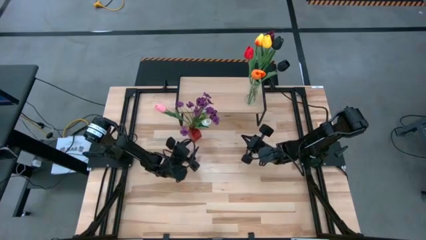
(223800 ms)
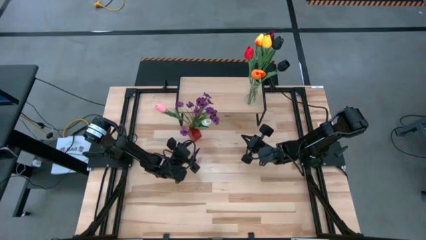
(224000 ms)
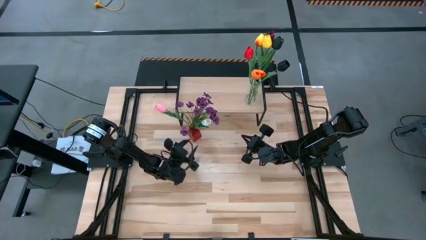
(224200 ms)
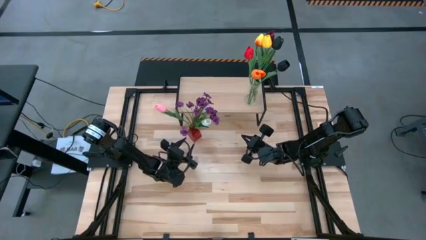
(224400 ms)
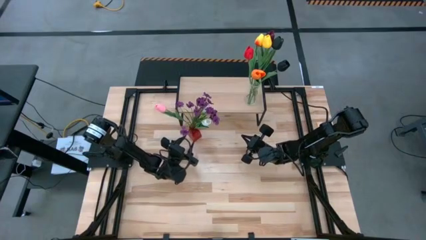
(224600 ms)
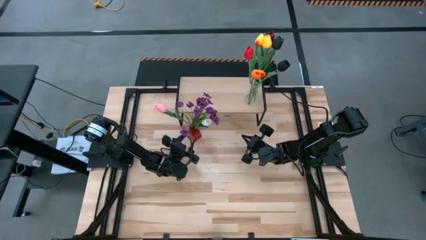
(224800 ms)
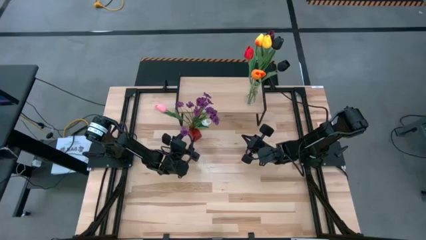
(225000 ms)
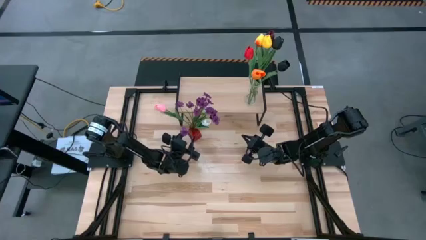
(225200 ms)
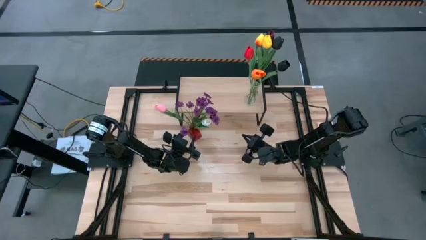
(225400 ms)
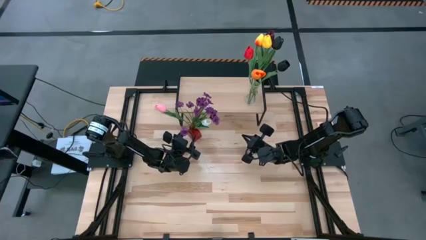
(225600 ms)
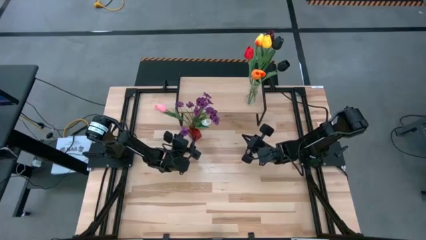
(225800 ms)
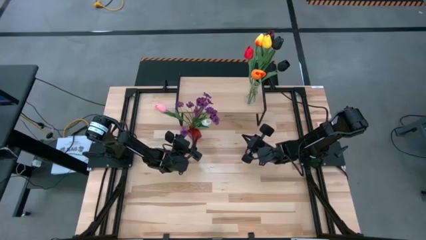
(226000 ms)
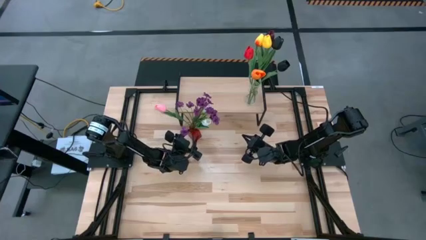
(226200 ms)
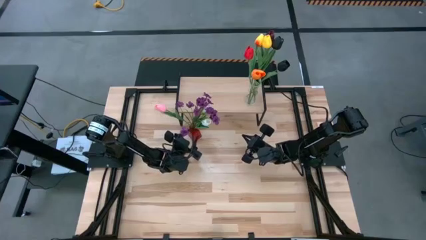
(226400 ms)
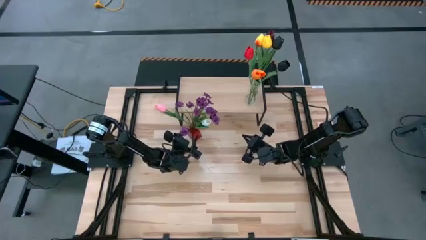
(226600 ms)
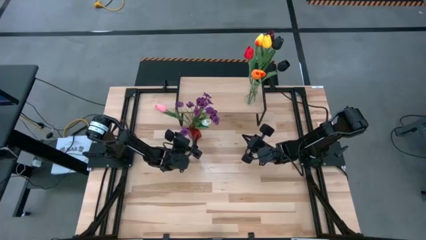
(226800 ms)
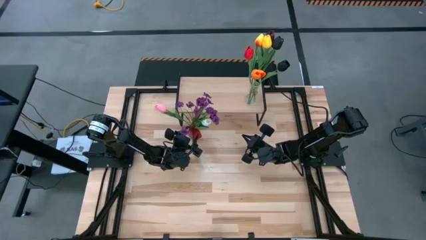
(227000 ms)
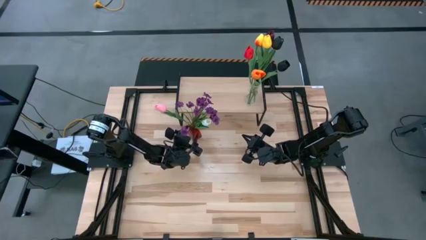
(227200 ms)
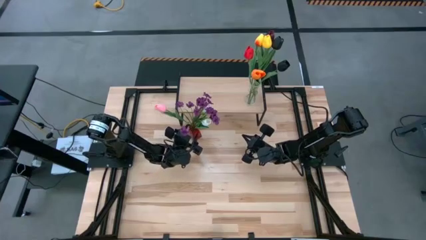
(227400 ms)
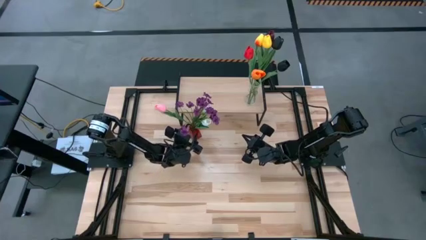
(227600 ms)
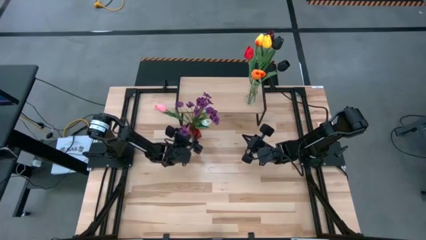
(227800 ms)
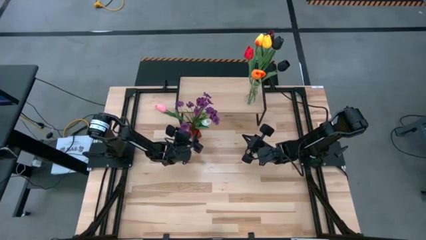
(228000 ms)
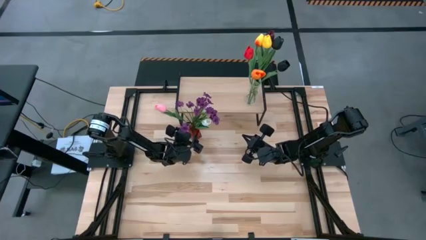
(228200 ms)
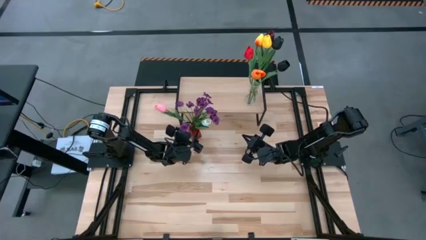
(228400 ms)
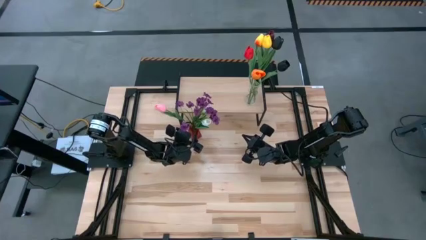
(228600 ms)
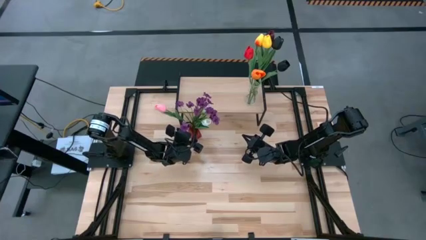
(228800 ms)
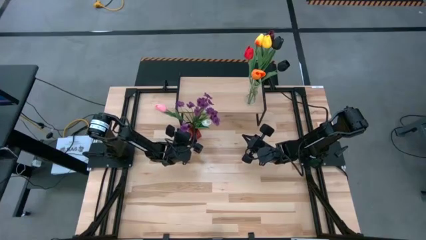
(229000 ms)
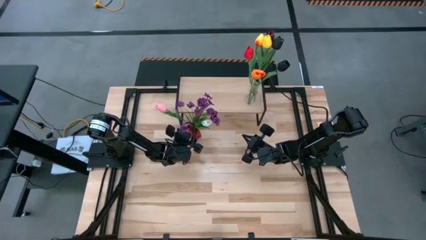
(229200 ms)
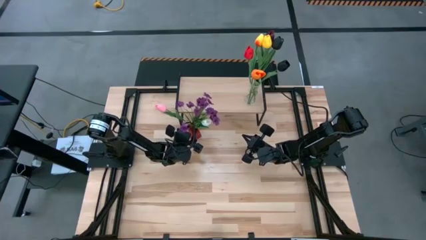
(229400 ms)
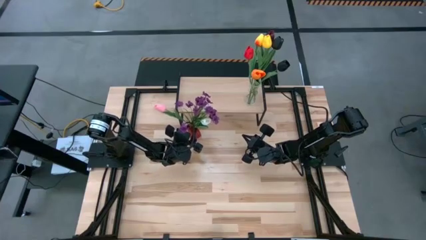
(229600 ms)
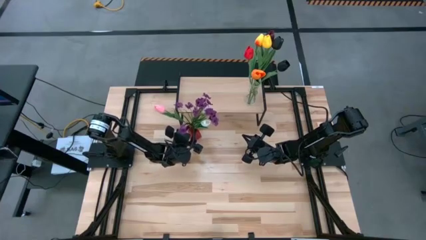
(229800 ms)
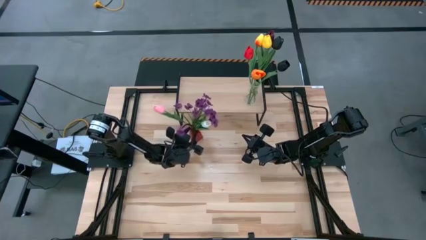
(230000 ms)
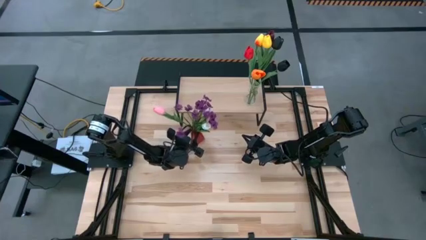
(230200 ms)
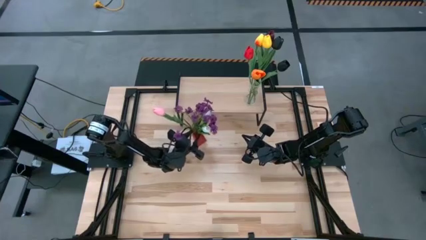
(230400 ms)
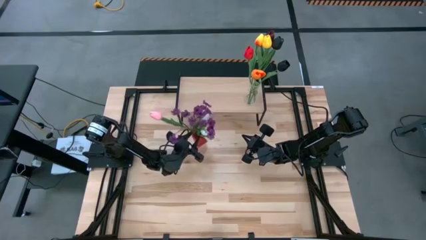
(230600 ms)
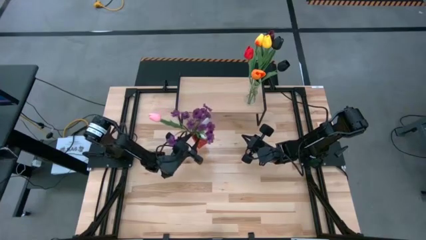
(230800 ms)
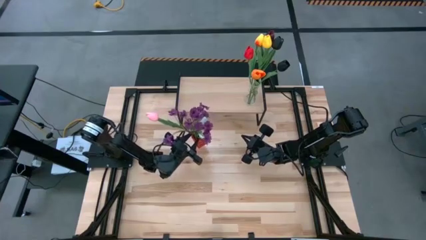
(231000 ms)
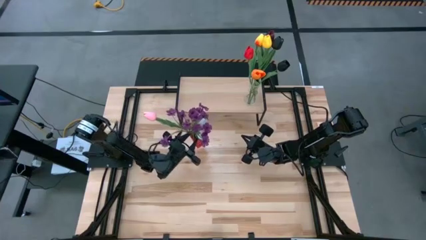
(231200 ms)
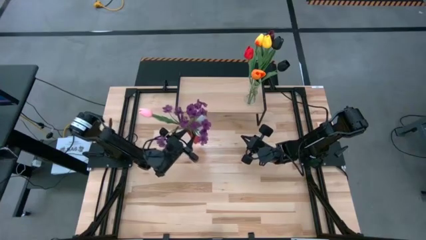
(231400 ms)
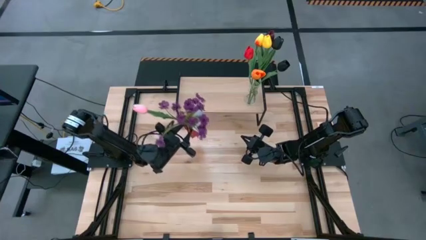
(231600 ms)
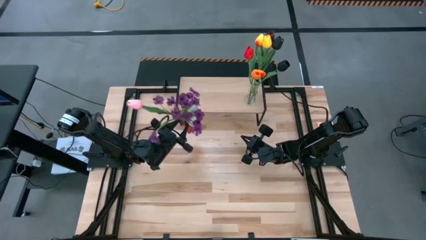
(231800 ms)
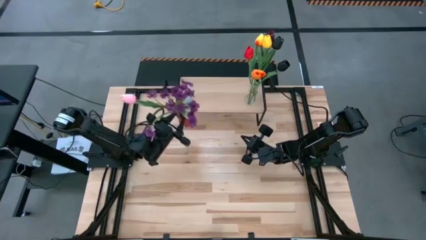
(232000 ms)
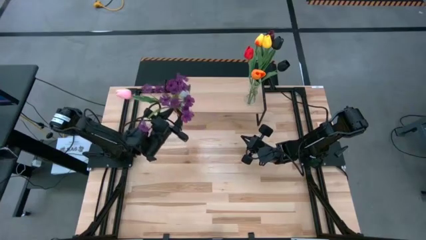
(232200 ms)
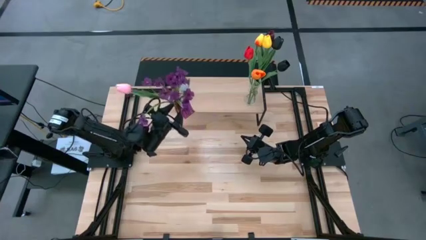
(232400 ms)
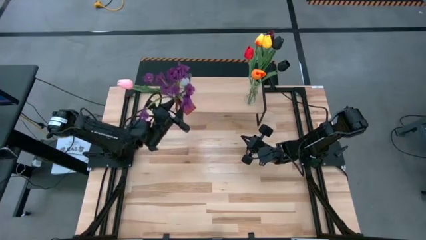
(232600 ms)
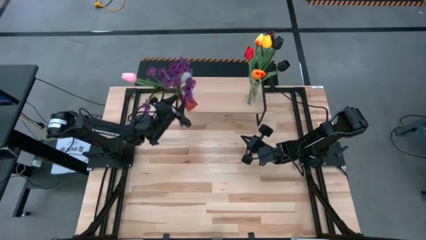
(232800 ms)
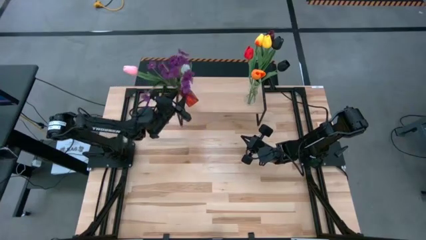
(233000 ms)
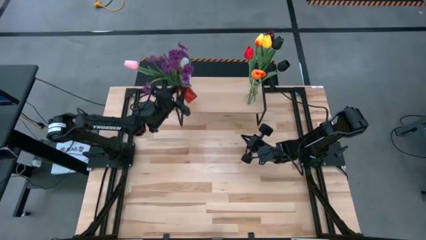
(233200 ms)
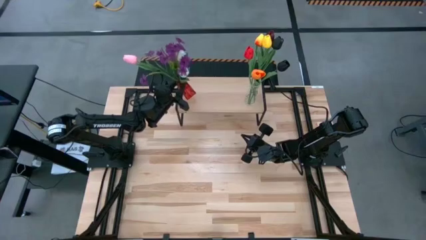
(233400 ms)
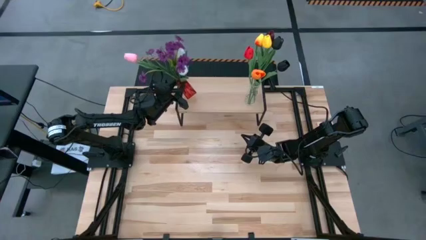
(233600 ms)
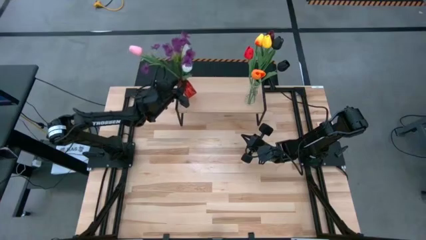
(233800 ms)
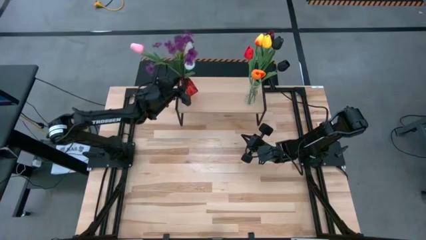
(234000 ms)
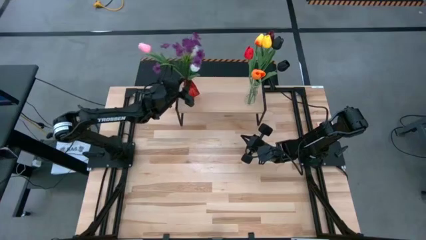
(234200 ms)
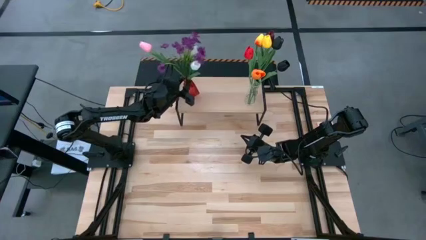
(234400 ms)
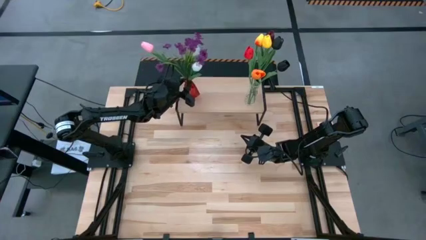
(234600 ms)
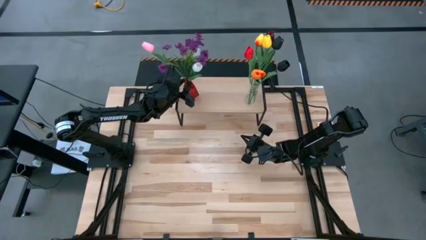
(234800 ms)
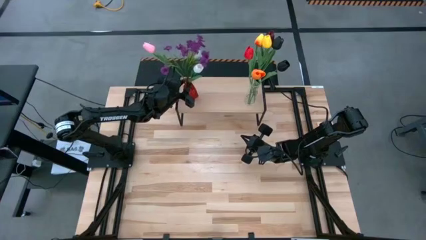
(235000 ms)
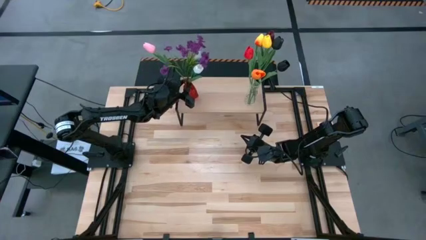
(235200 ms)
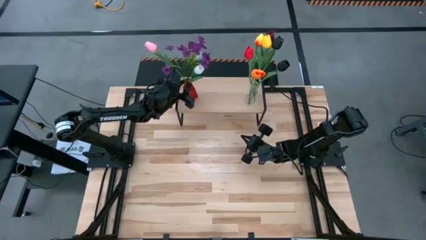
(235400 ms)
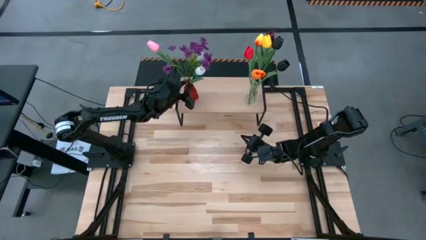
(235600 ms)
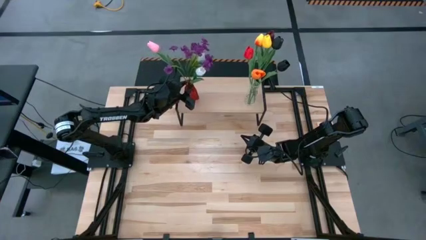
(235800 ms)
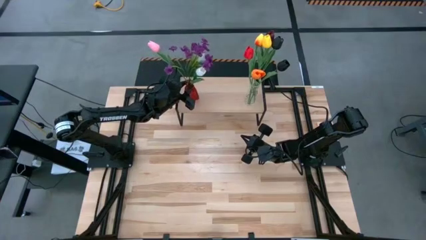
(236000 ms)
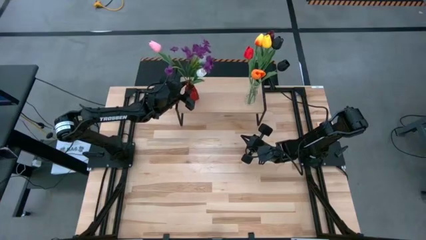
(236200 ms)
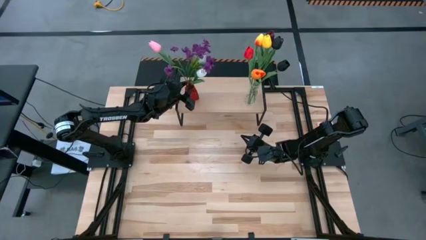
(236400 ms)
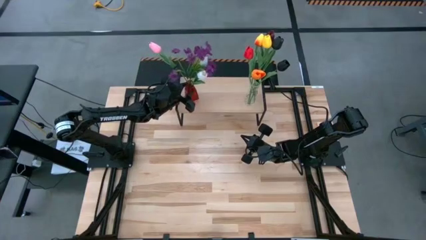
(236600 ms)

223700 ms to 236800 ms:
Task: Pick and place flowers into a vace then onto a shelf
Put the red vase with flowers on the shelf
